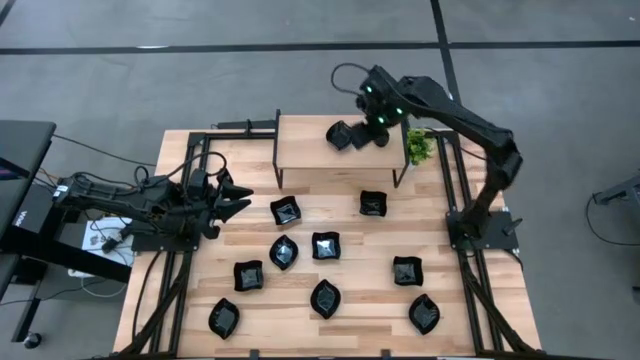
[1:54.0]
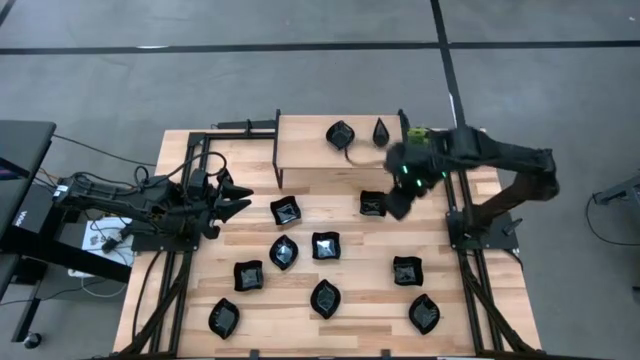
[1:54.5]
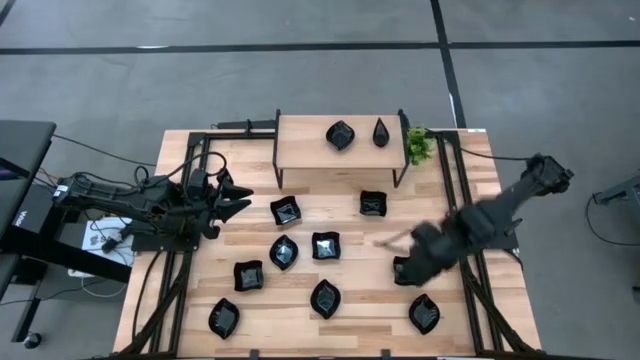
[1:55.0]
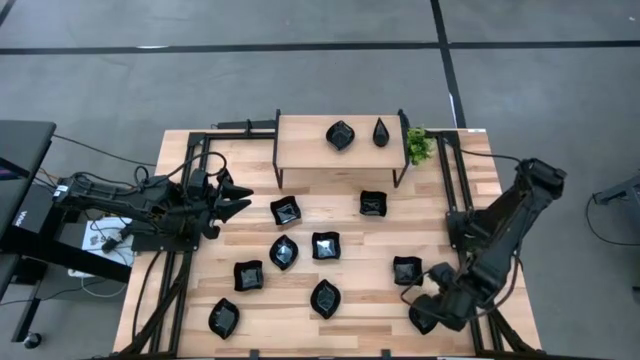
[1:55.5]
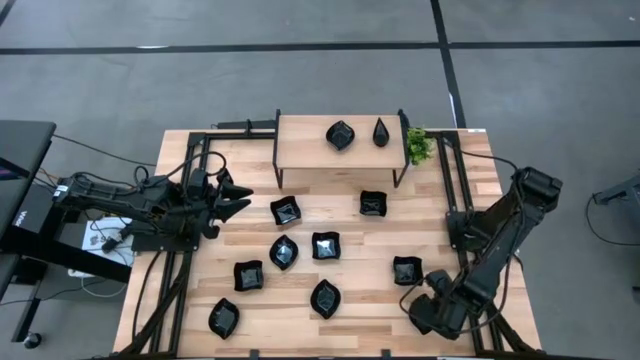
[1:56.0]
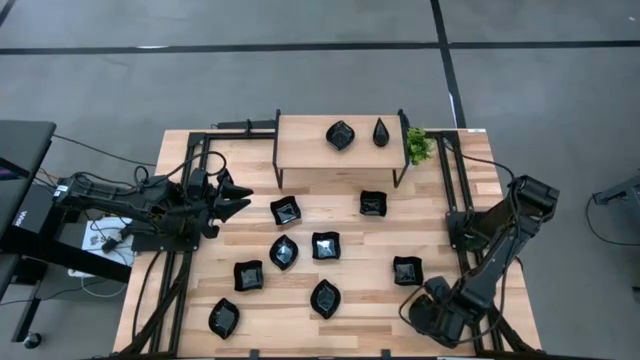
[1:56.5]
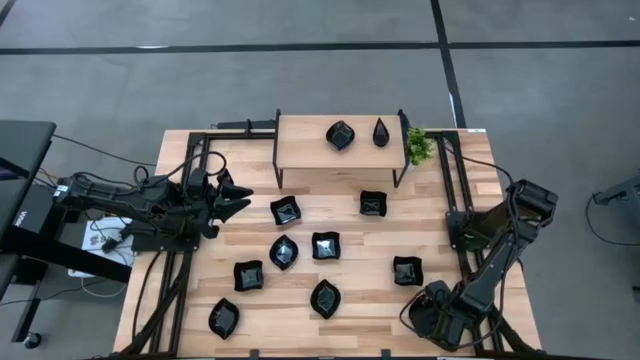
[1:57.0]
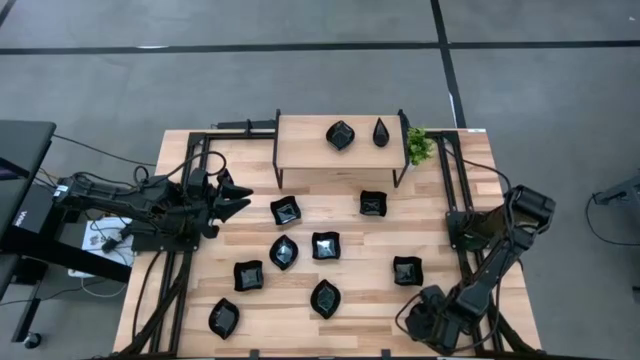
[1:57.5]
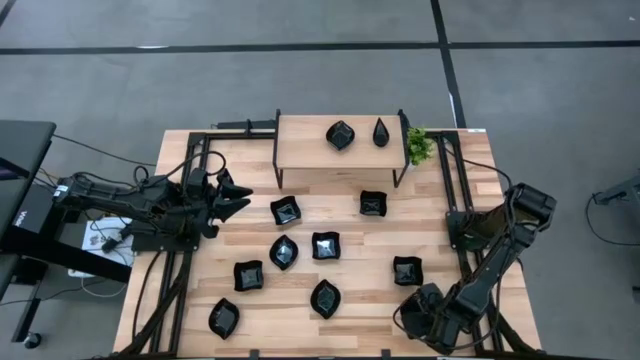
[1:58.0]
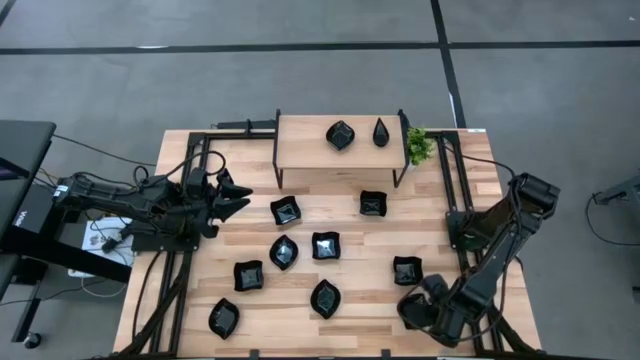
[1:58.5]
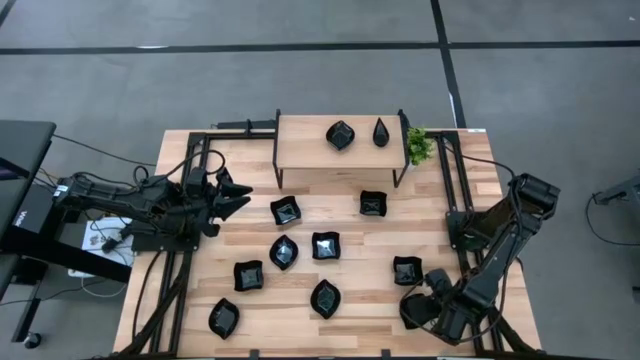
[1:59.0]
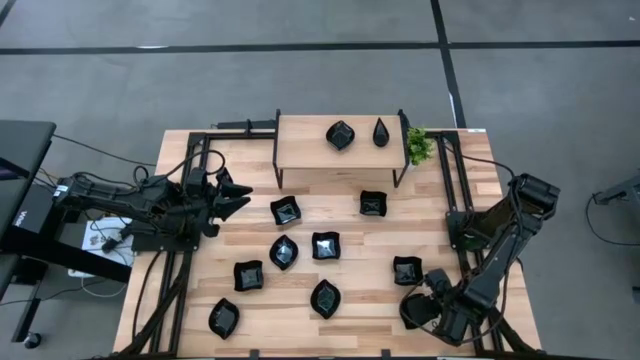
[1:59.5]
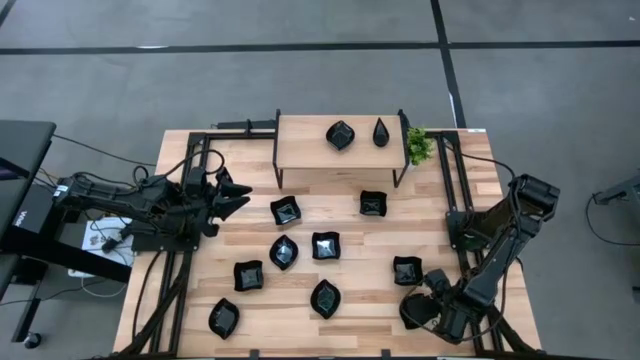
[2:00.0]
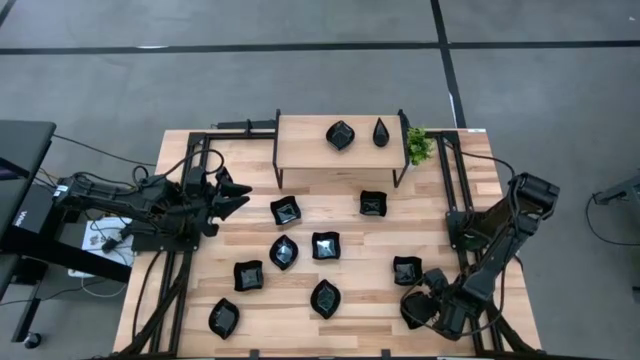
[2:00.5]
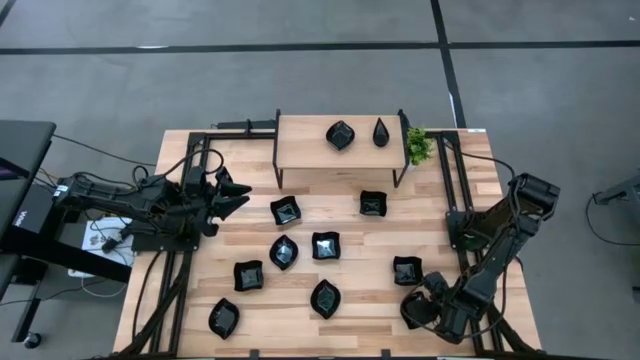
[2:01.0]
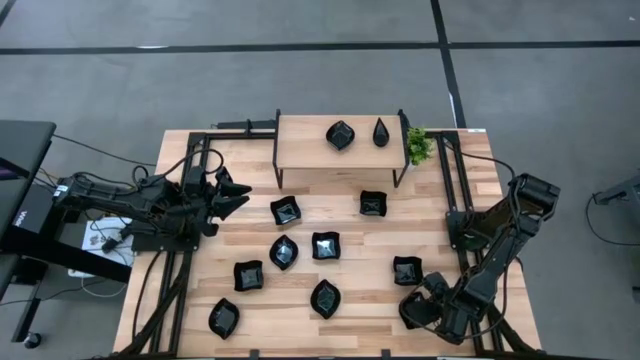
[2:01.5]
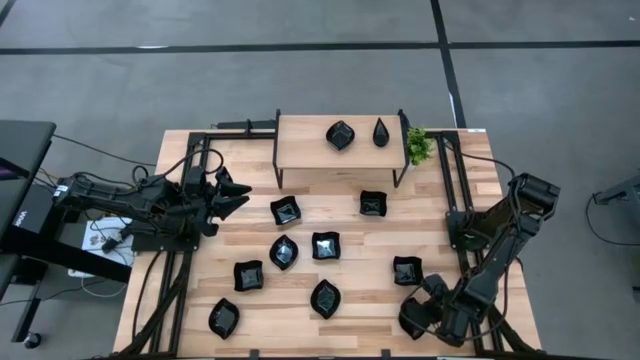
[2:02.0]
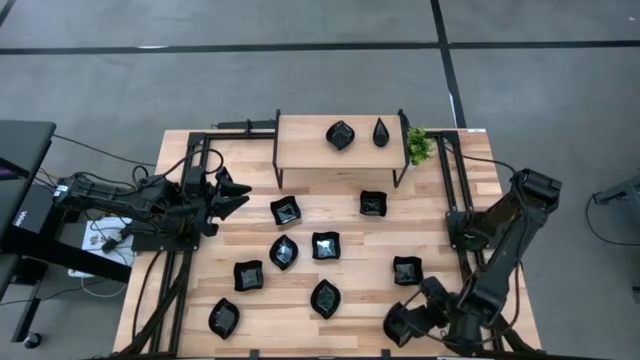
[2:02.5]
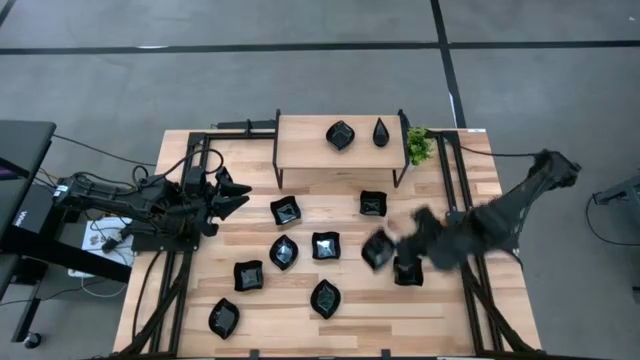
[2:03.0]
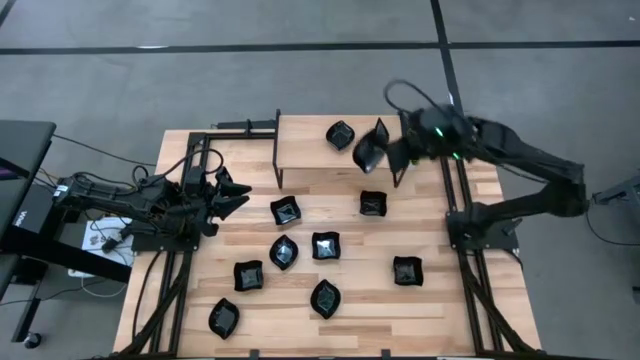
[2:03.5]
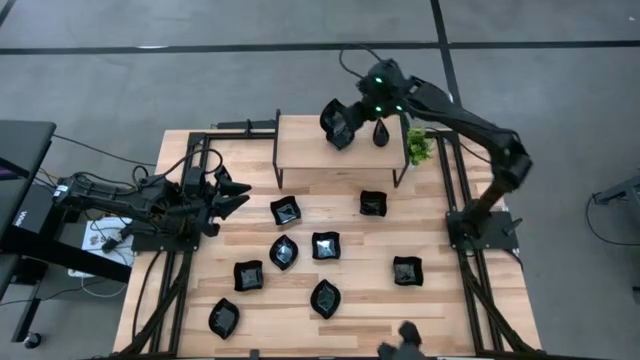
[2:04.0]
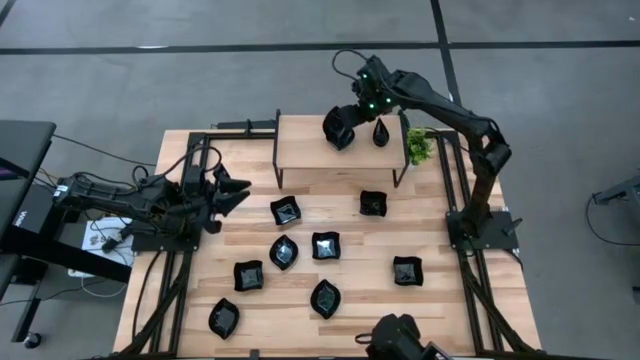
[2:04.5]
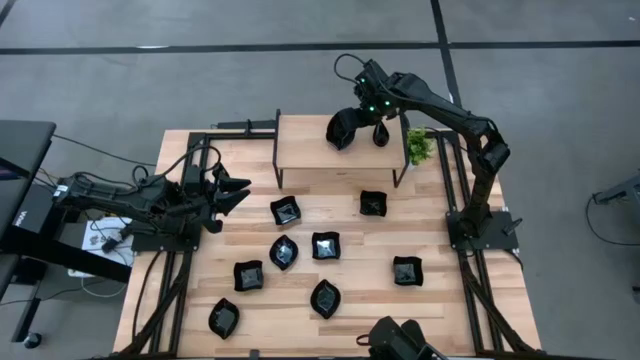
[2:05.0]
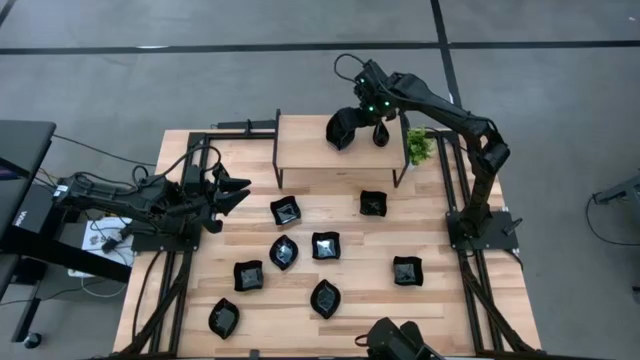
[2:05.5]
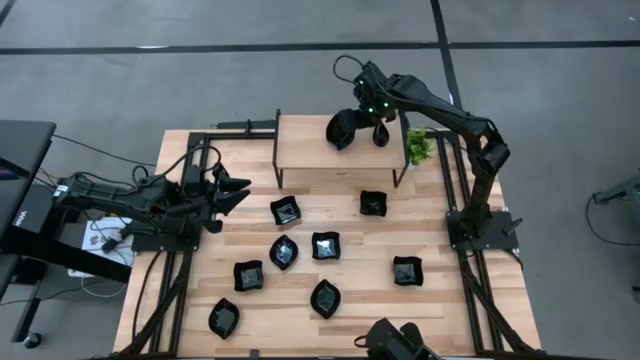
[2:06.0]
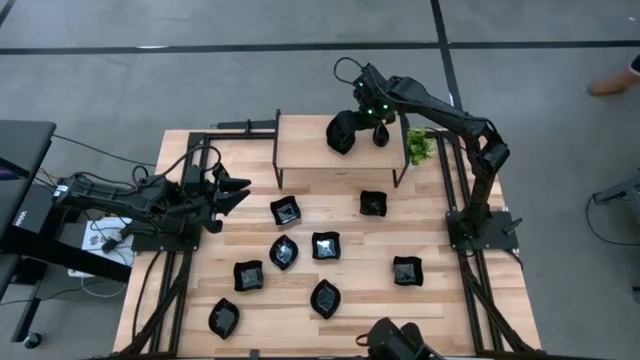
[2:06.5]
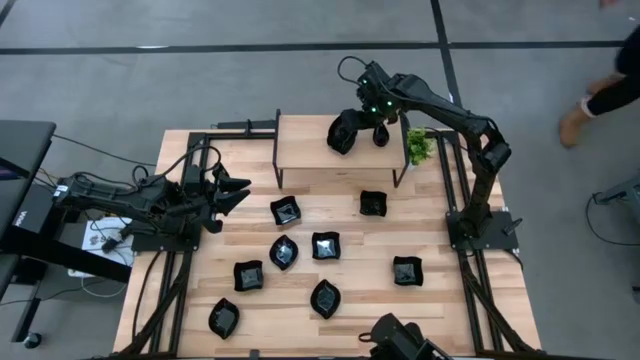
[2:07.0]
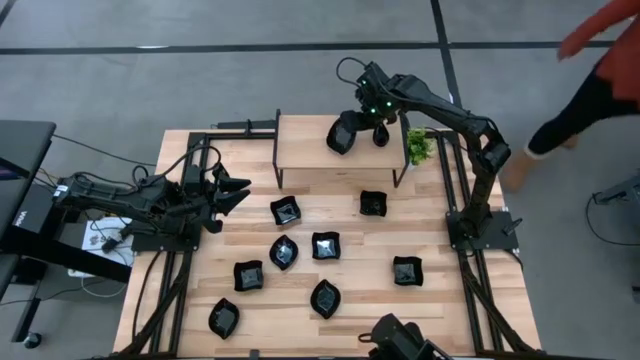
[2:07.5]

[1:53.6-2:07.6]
Task: Pick & Place Mini shaped plates
Stack the leaf-shaped plate on top of the leaf-shaped plate on the shelf

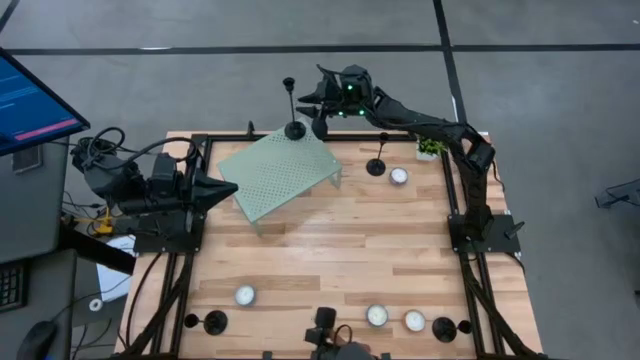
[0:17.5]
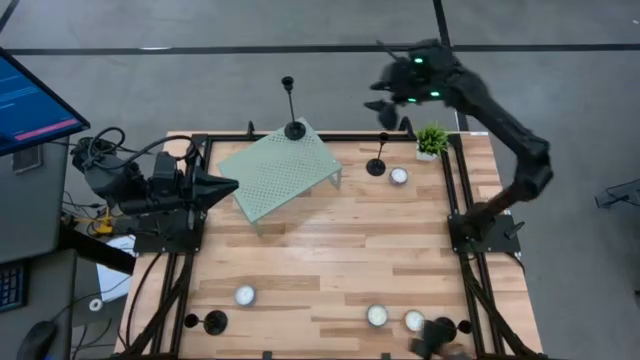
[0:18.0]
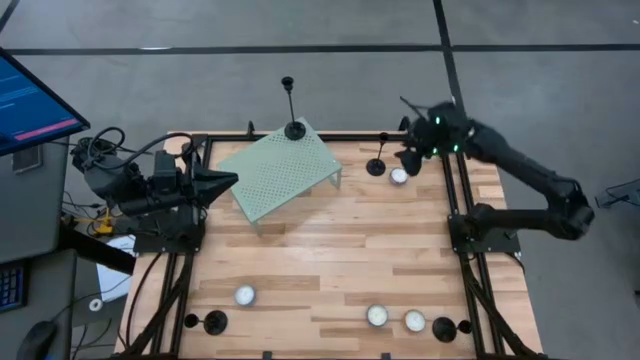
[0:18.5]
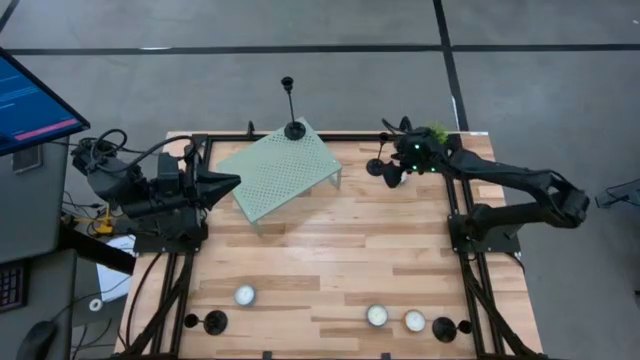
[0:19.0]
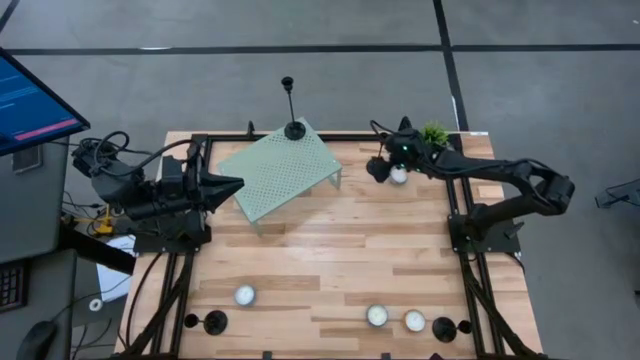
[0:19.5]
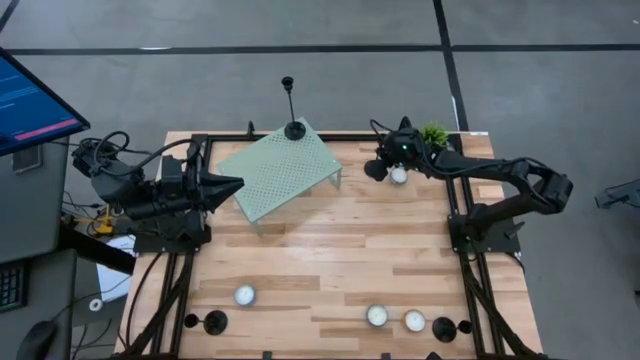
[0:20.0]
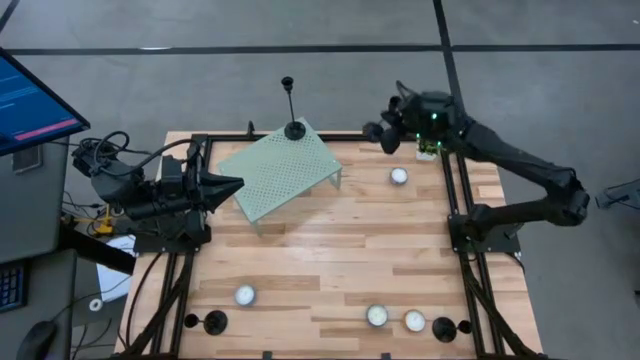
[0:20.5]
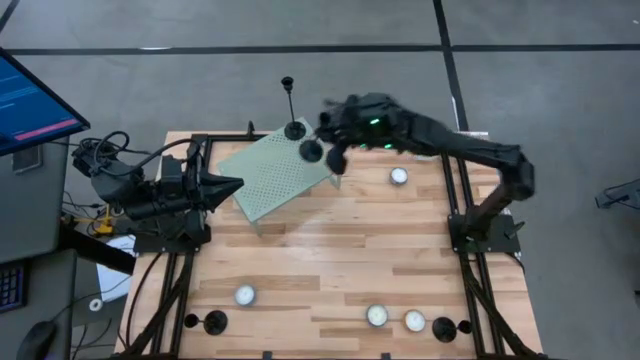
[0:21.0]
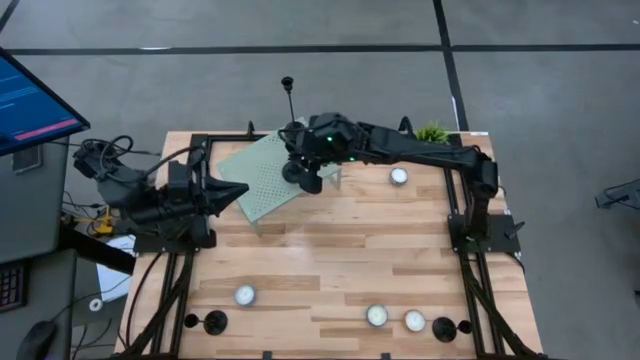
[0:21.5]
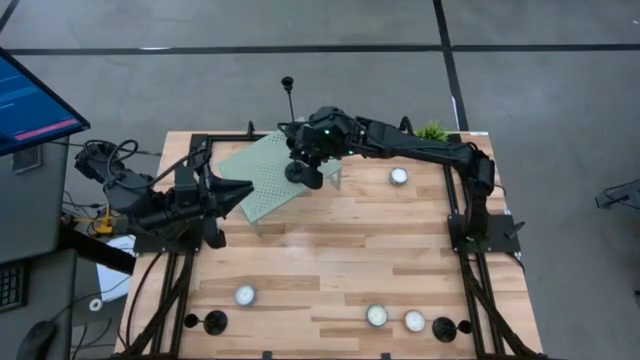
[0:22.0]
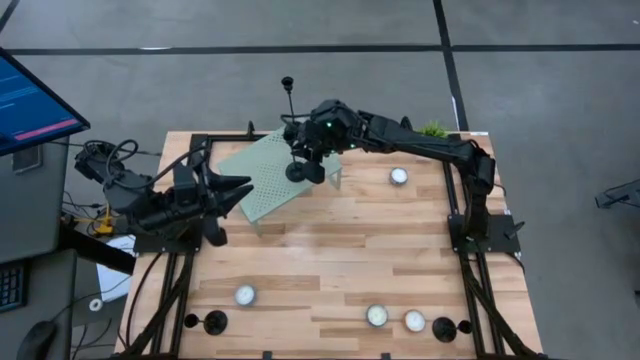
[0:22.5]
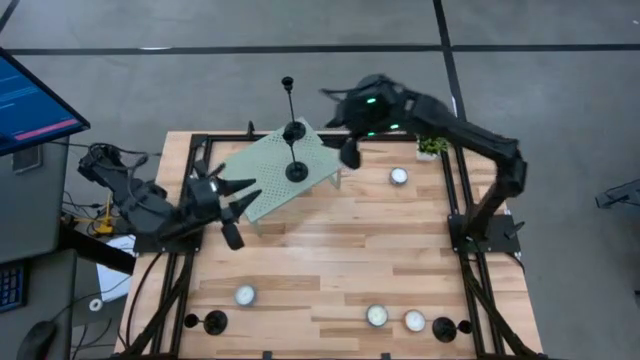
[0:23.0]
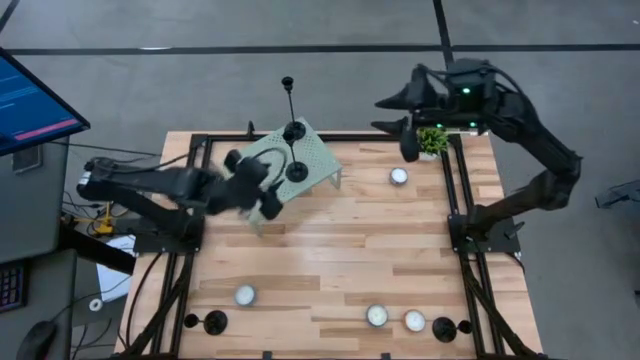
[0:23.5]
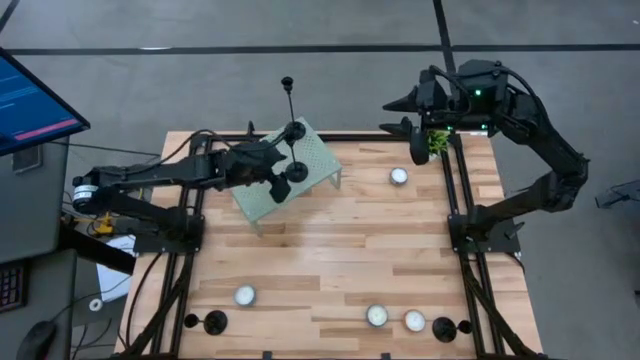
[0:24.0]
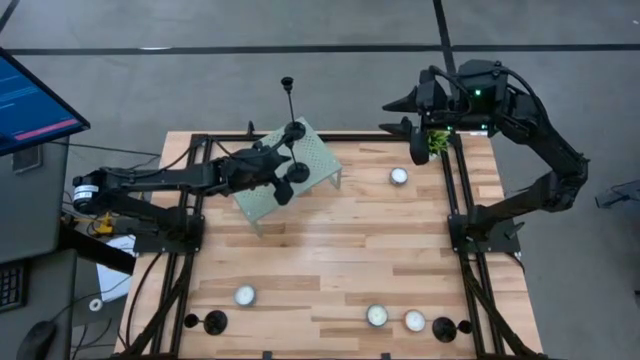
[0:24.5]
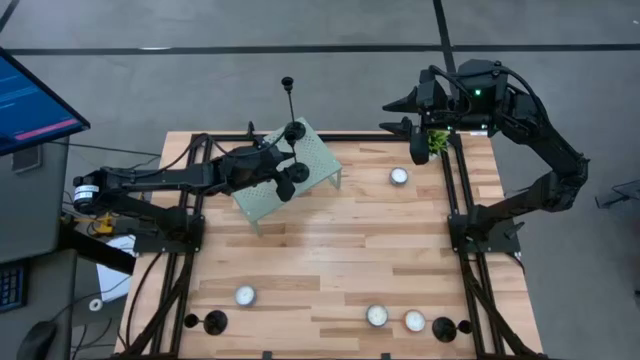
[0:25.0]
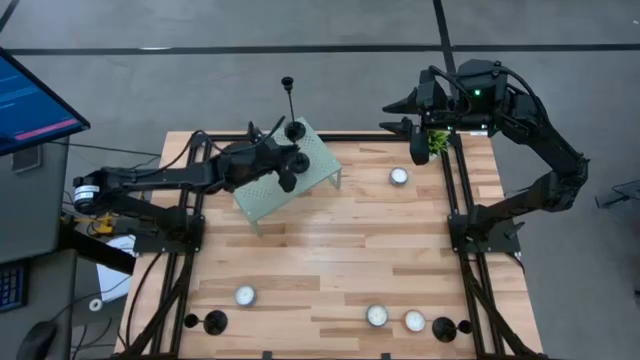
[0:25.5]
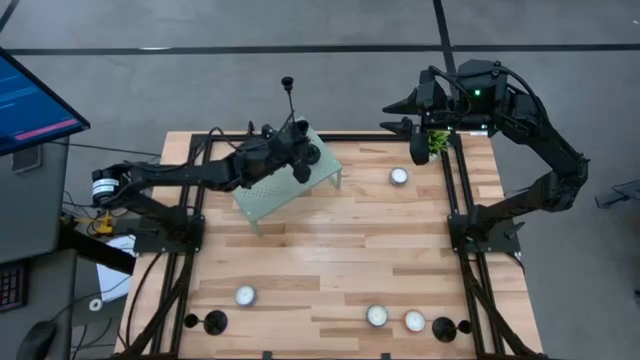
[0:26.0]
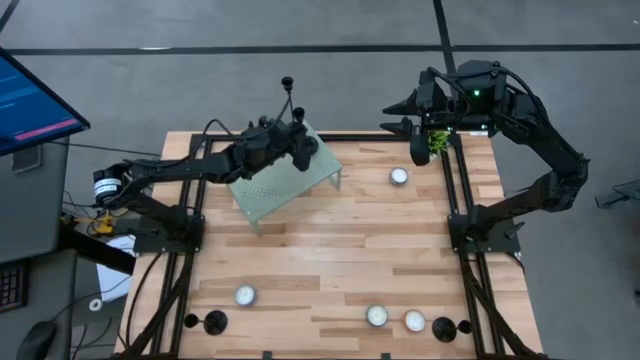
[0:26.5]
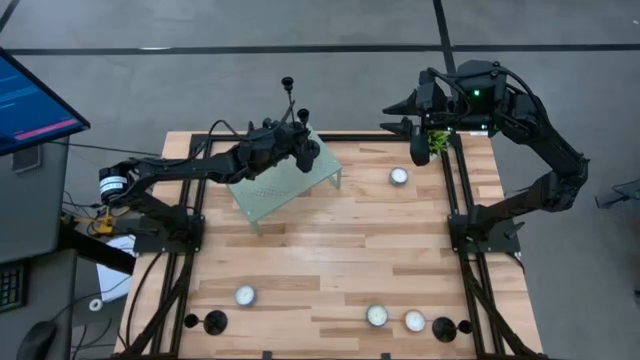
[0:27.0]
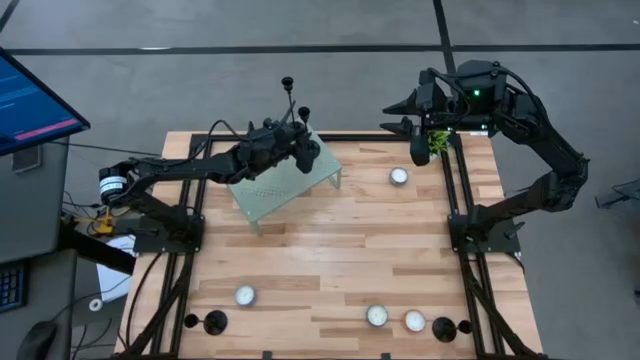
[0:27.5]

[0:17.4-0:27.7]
Task: Pick & Place candle stick holders
Align the black candle holder with the other black candle holder on the shelf
